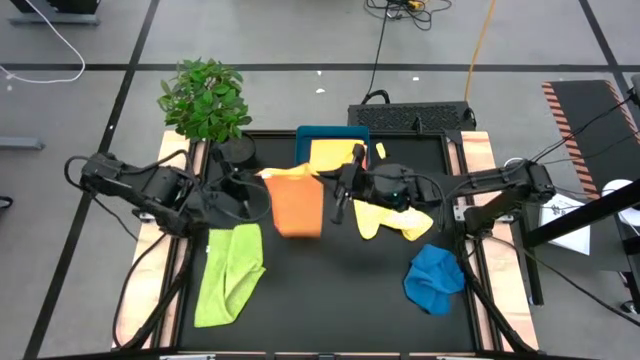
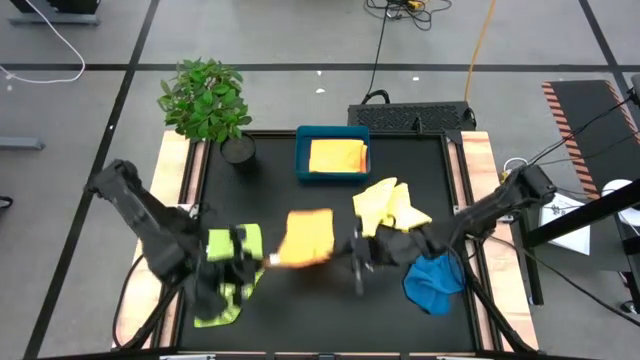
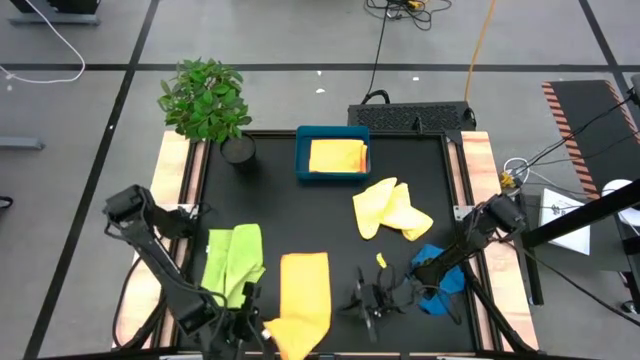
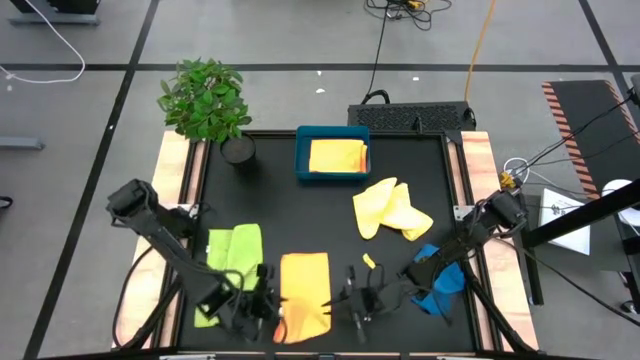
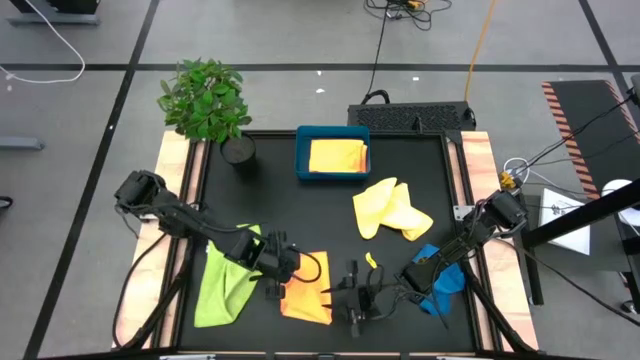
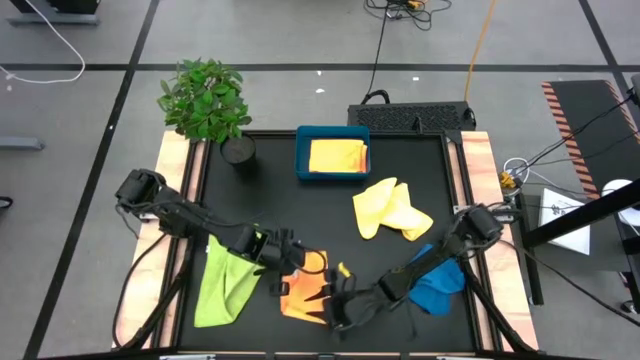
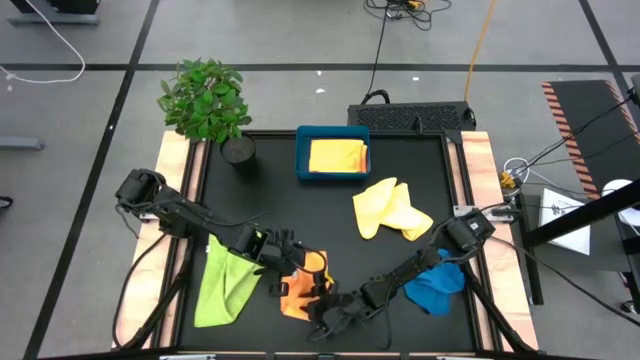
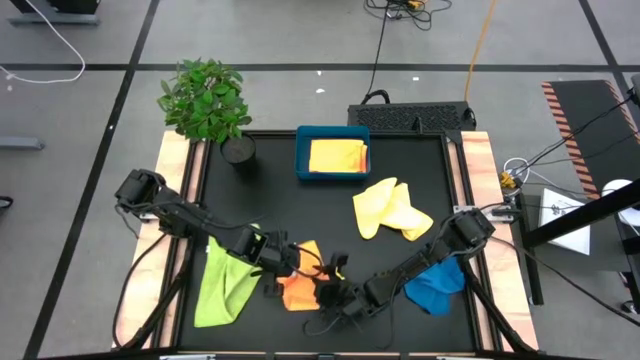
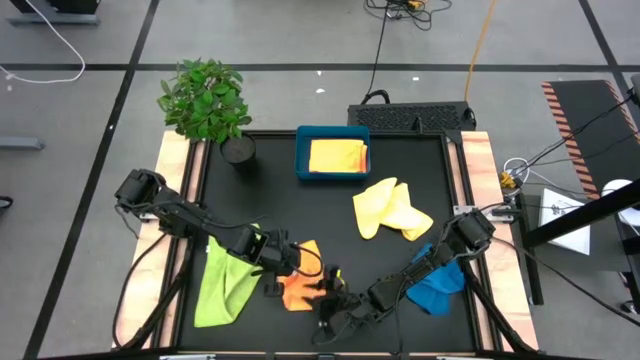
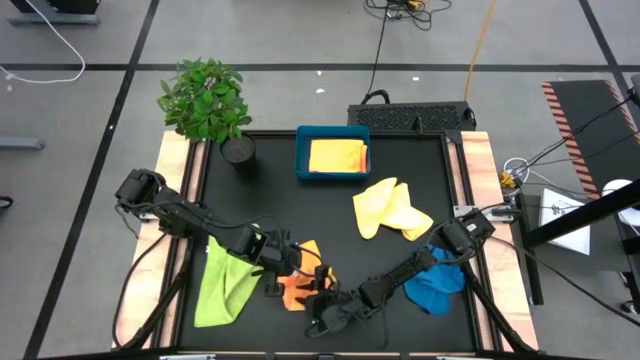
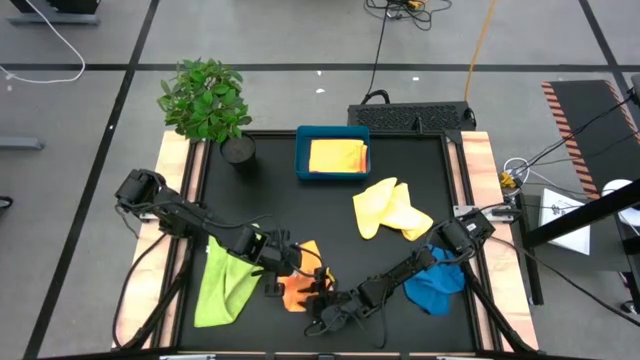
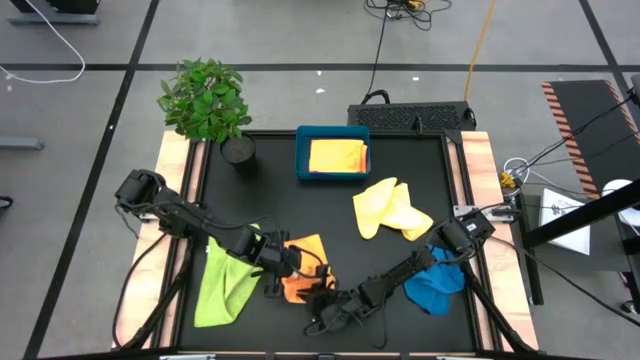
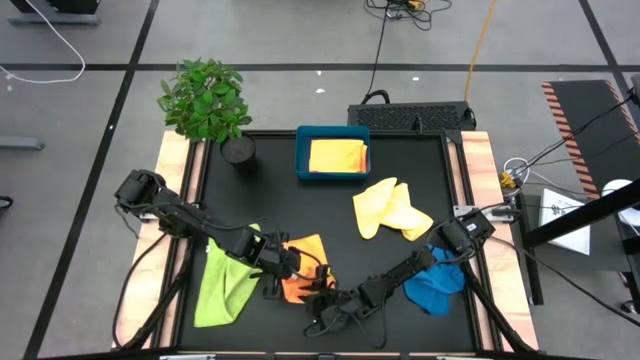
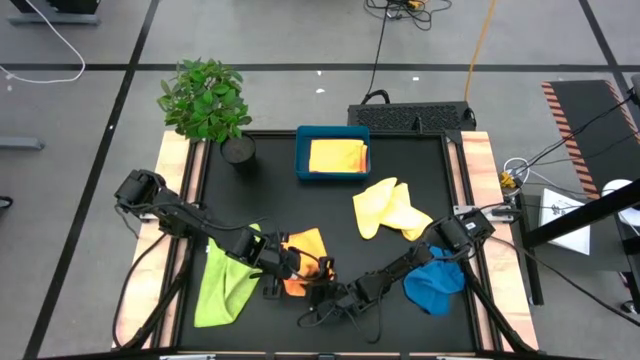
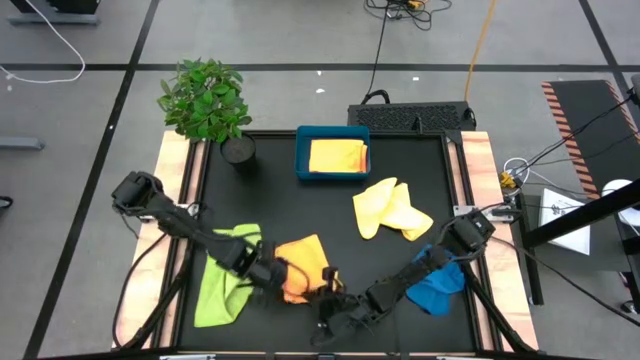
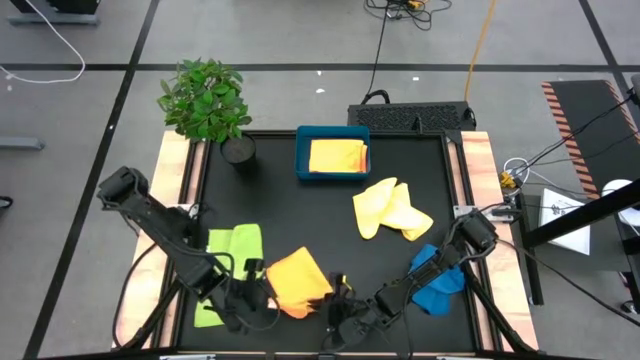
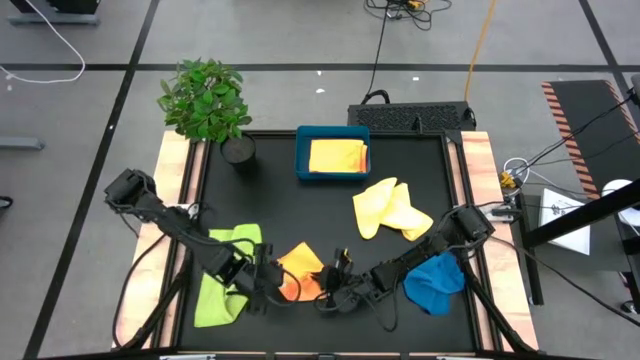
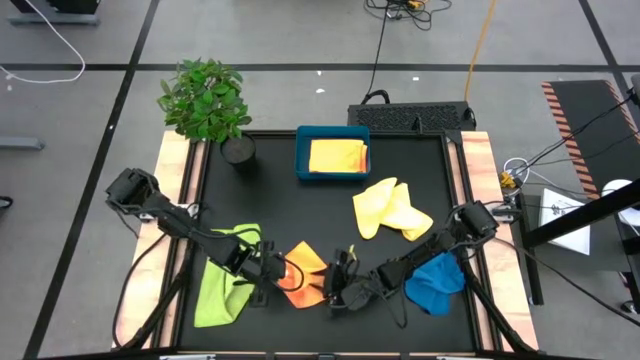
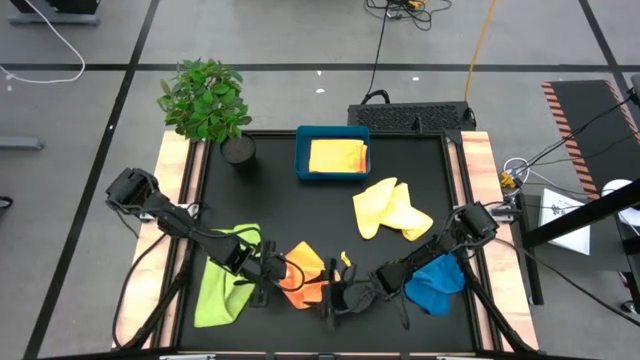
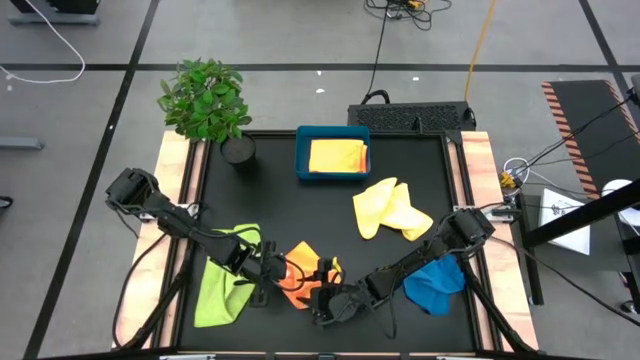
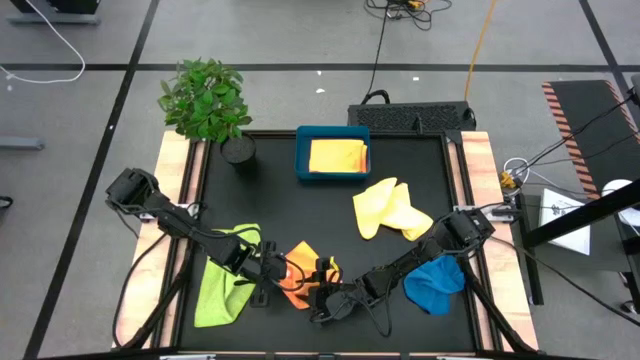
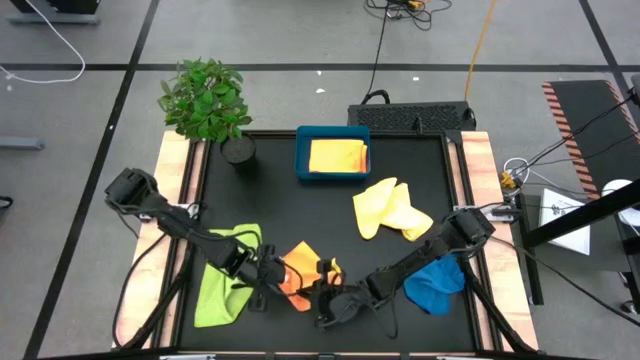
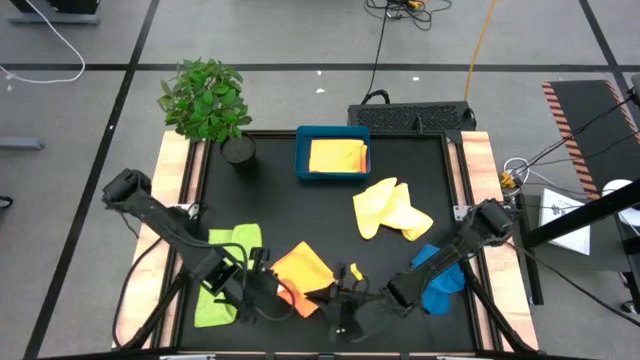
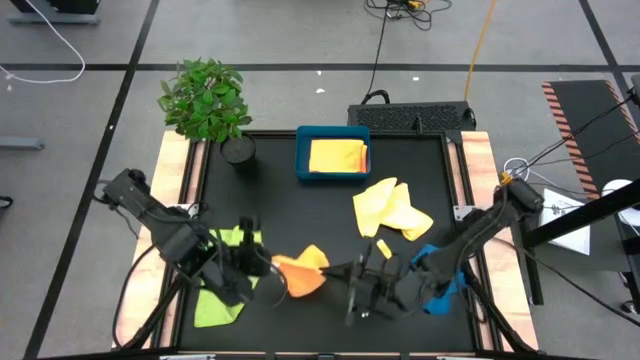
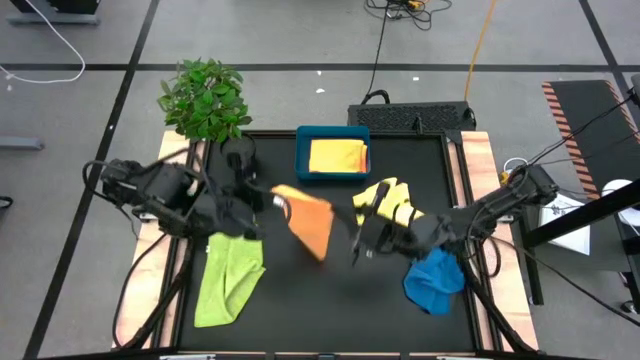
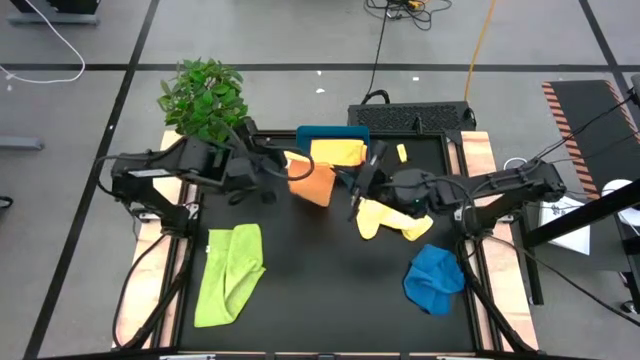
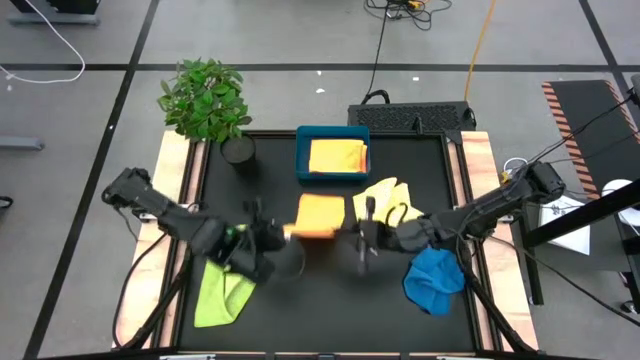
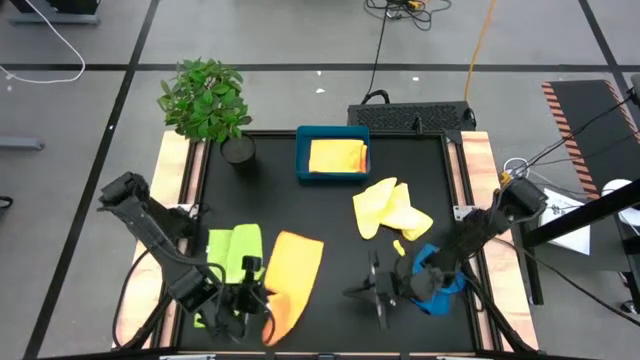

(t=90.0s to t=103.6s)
Task: Fold microfiber towels
Fold the orange microfiber towel

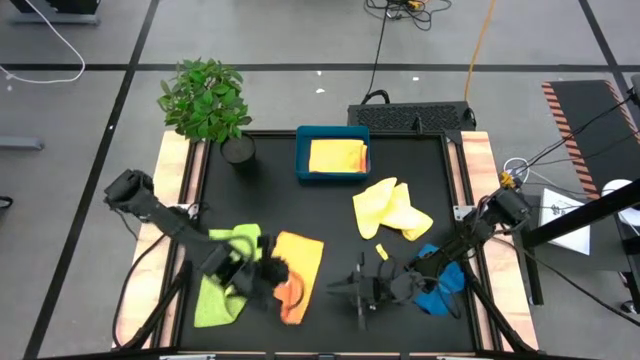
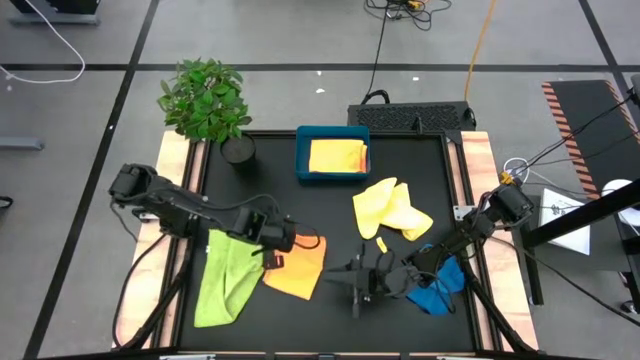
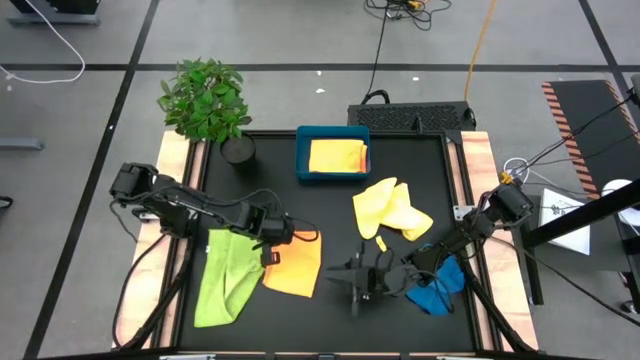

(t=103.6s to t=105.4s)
Fold the orange microfiber towel

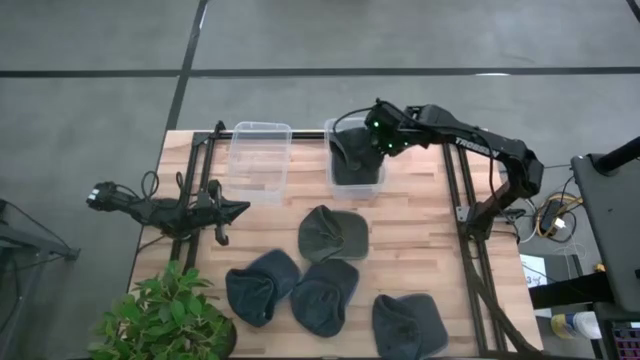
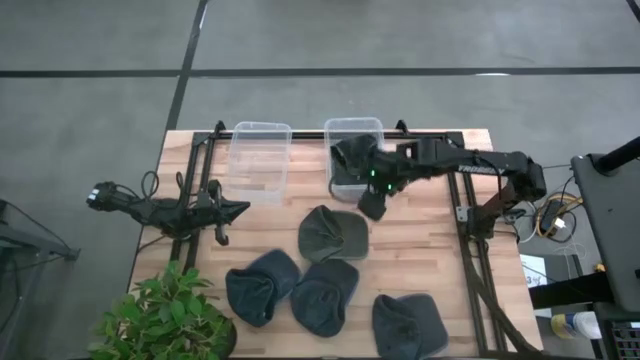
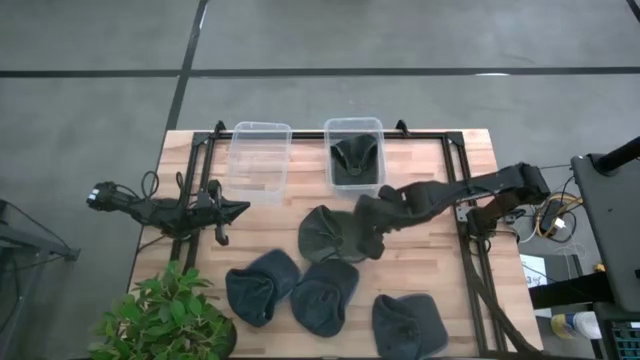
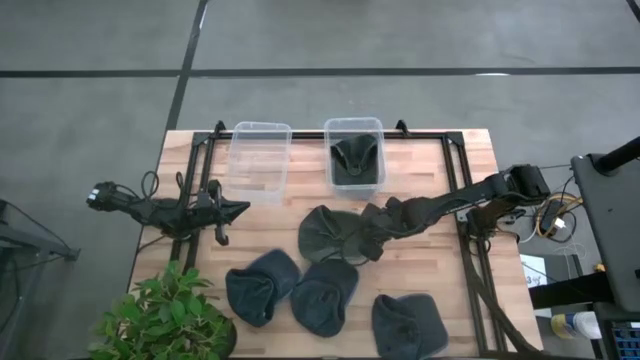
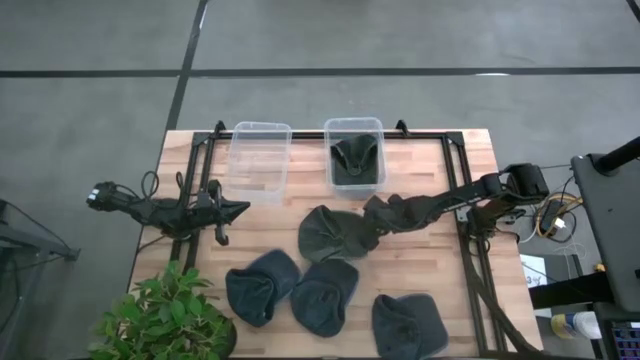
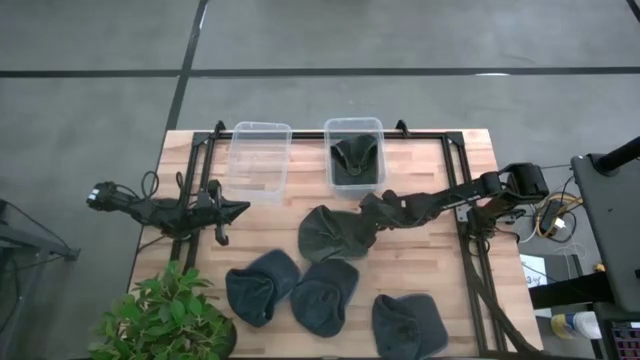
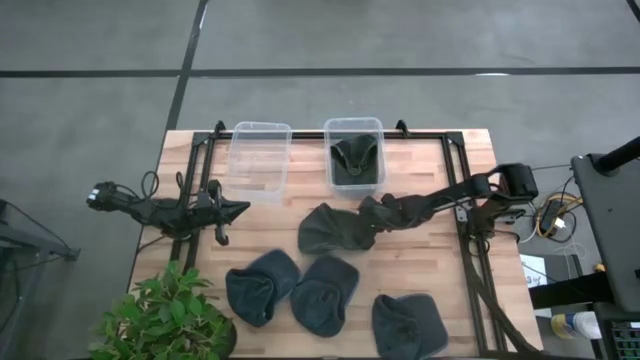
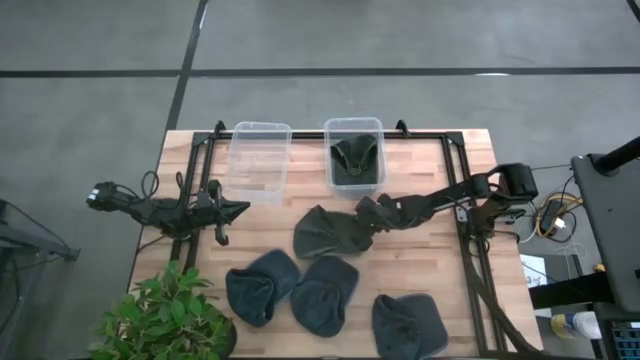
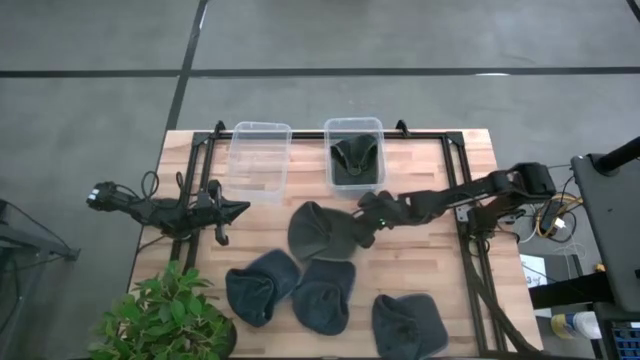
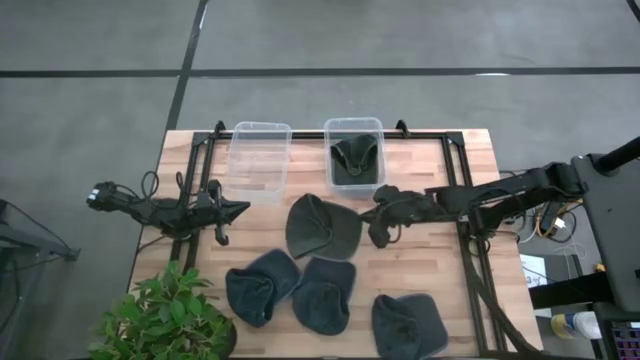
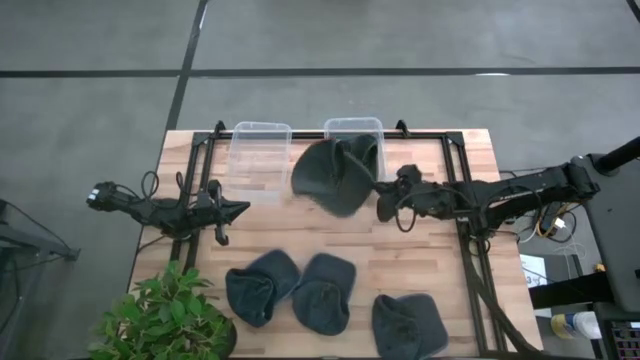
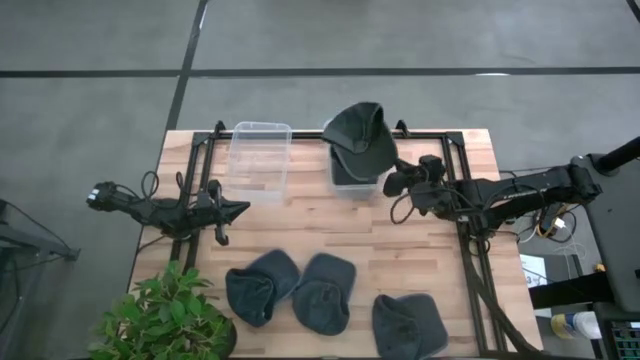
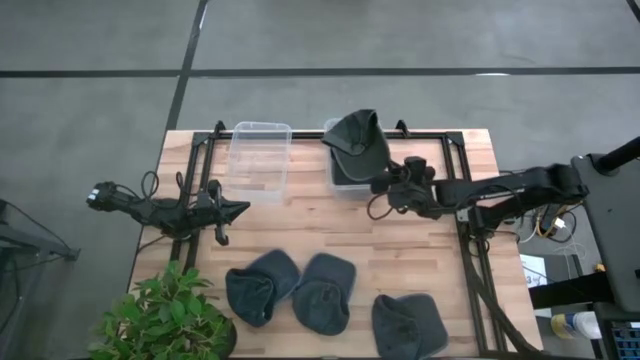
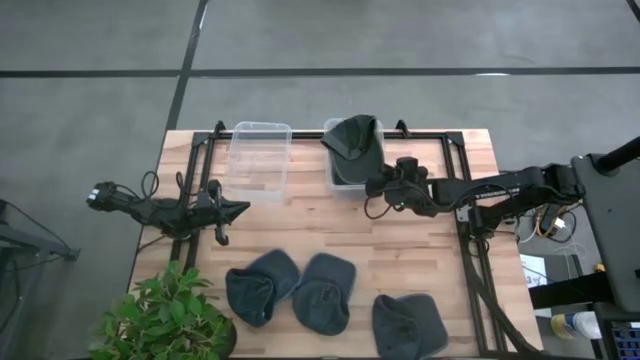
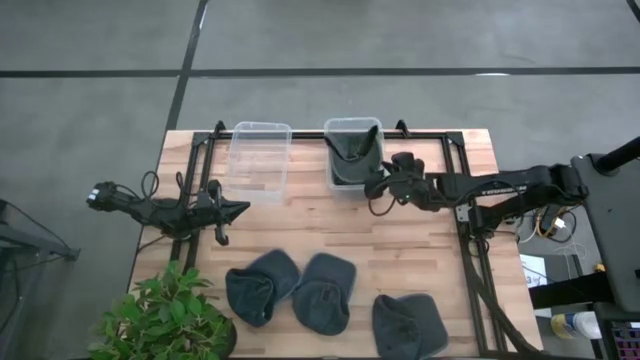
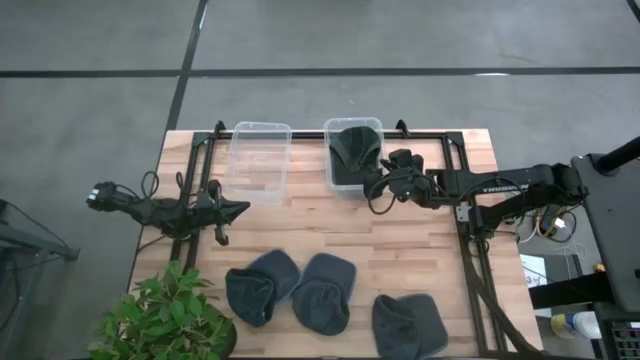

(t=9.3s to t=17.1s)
Task: Pick & Place hat
Put the gray cap into the right transparent bin
